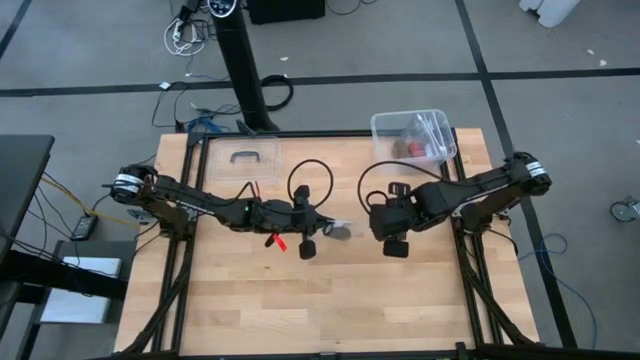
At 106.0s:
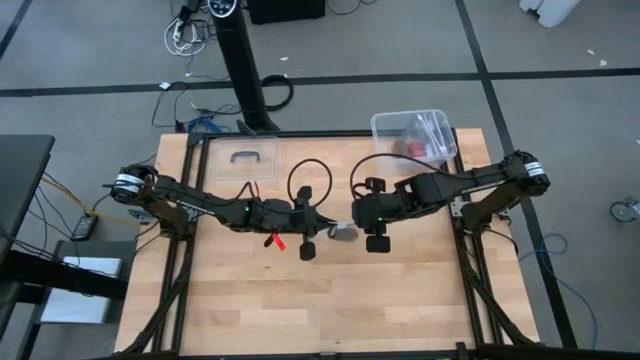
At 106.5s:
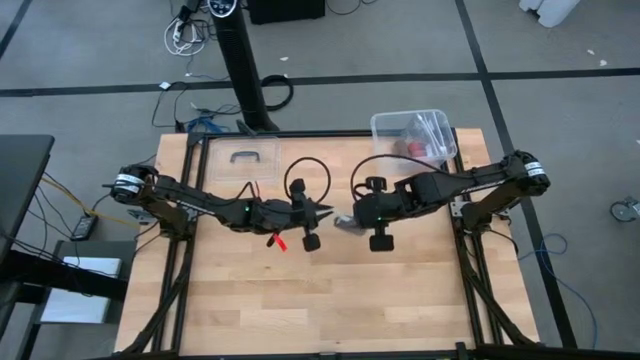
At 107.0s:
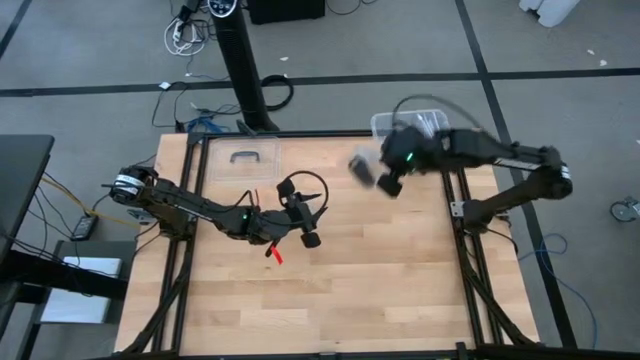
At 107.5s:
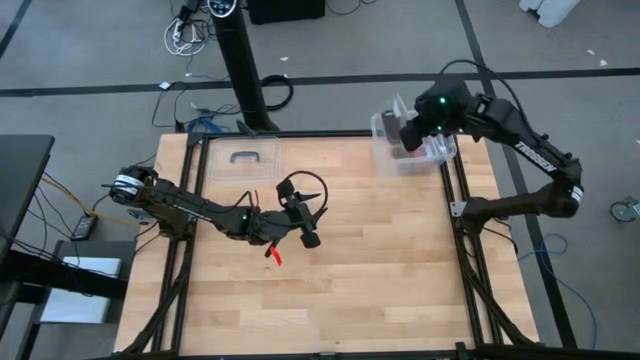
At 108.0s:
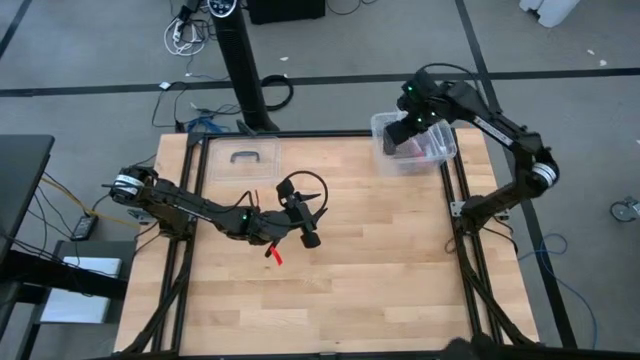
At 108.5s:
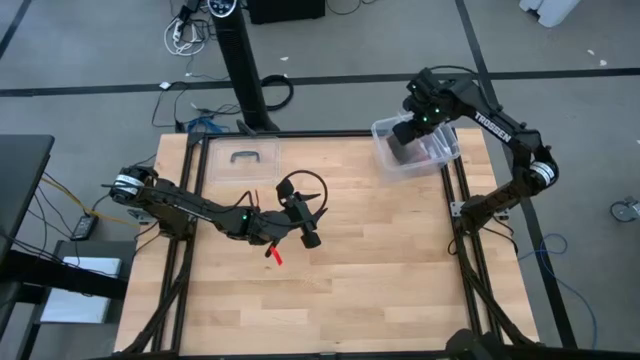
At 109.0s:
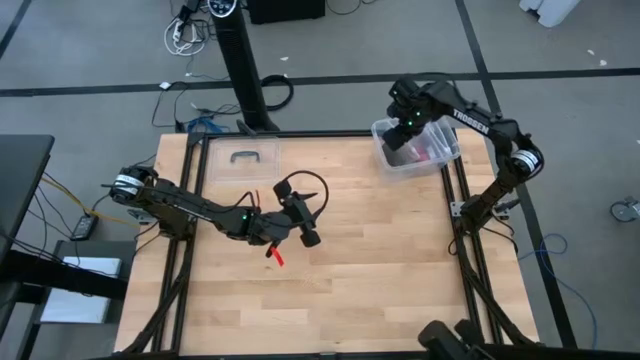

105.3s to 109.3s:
Task: Roll bandage
Put the transparent zip bag into the transparent bin

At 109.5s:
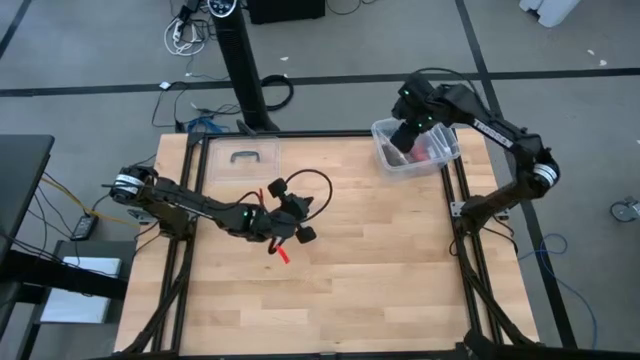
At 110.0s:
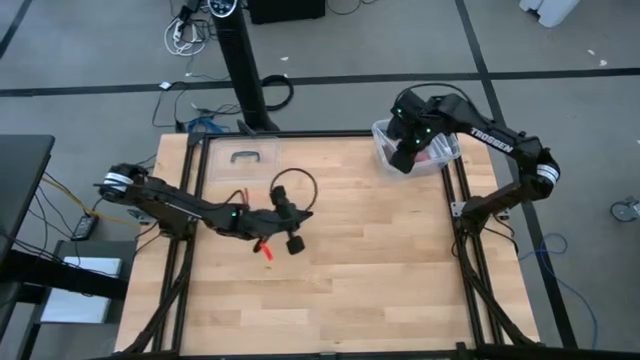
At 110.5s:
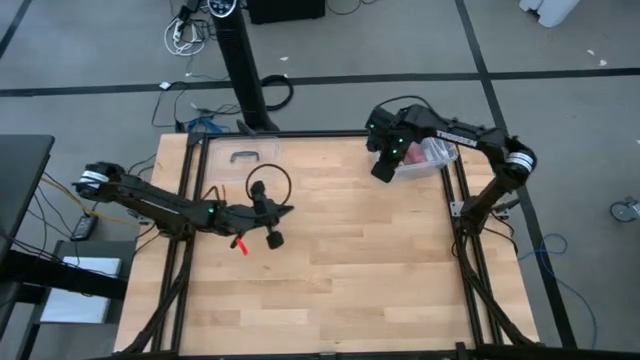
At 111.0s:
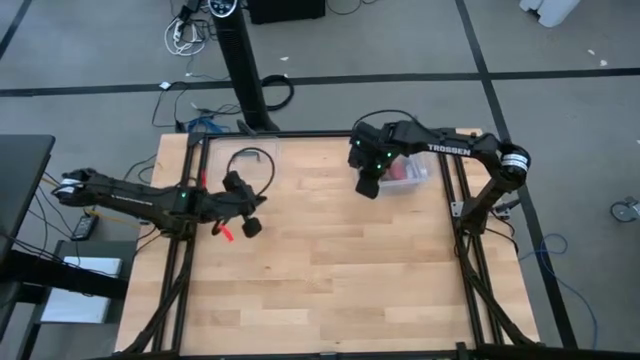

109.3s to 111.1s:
Adjust the transparent bin

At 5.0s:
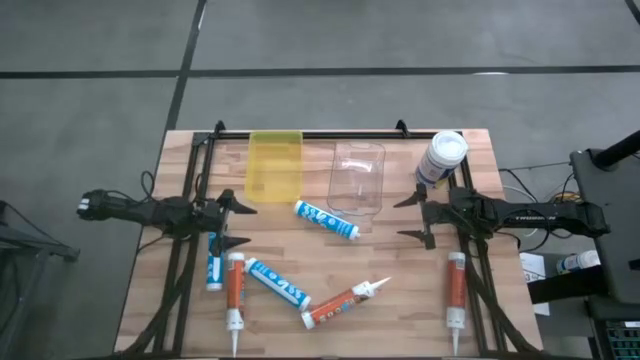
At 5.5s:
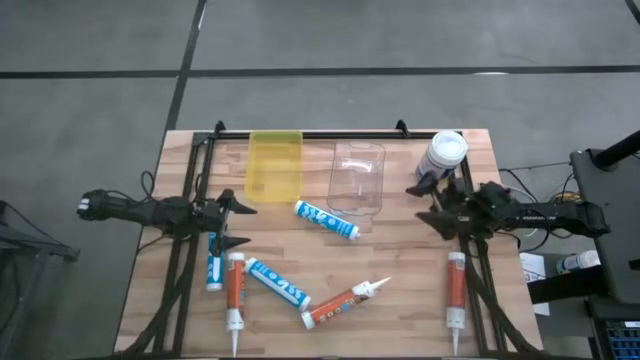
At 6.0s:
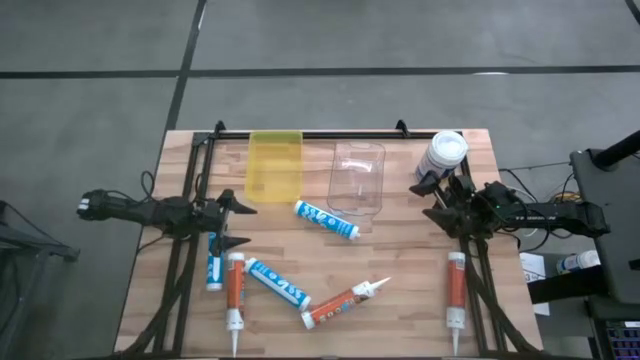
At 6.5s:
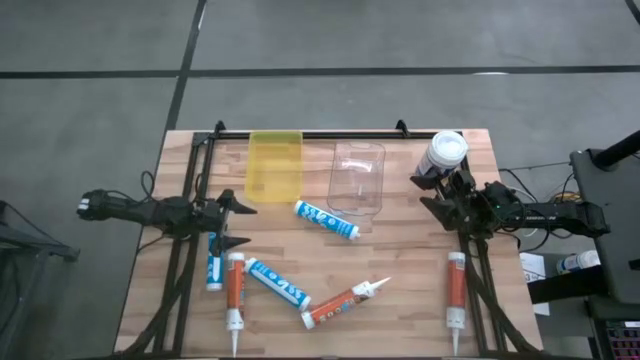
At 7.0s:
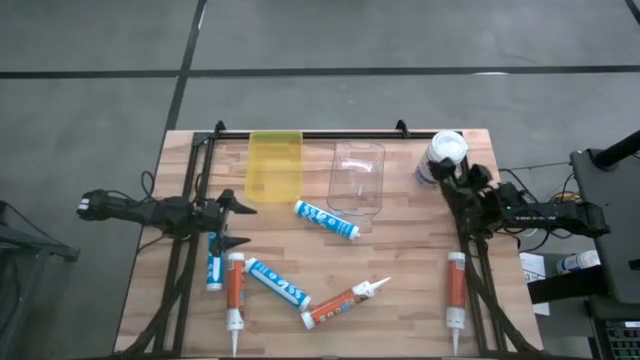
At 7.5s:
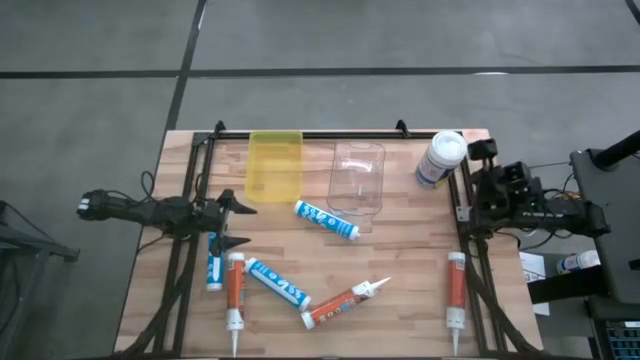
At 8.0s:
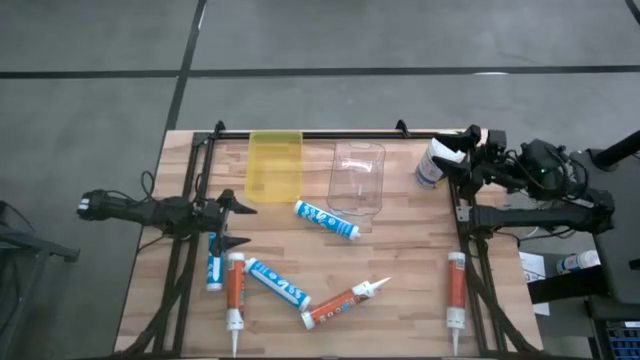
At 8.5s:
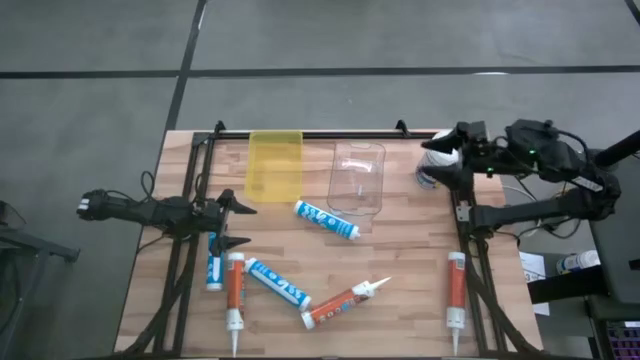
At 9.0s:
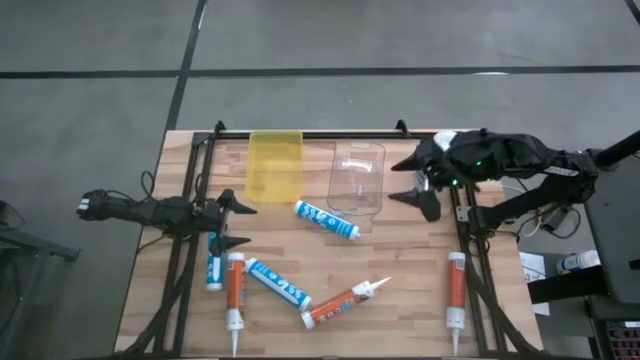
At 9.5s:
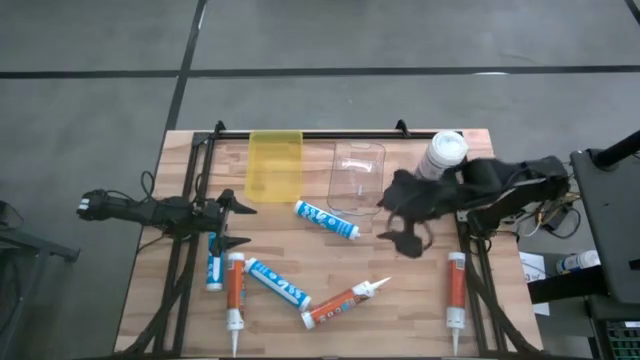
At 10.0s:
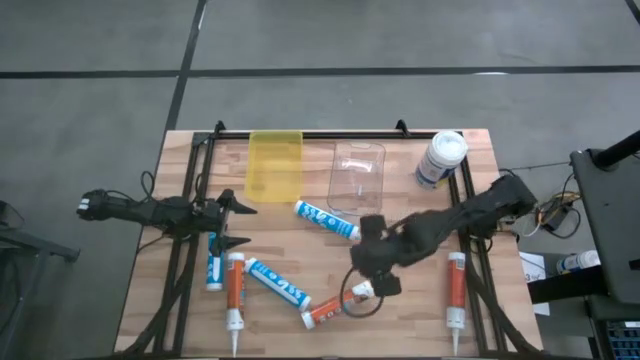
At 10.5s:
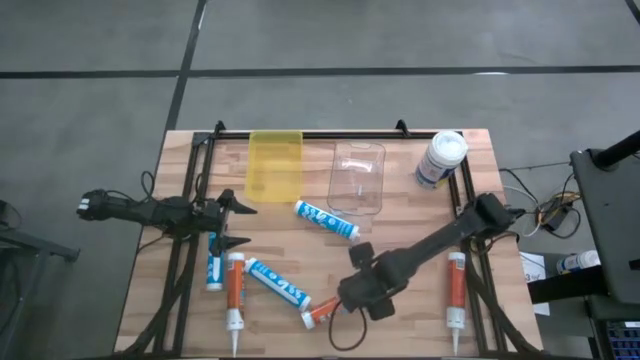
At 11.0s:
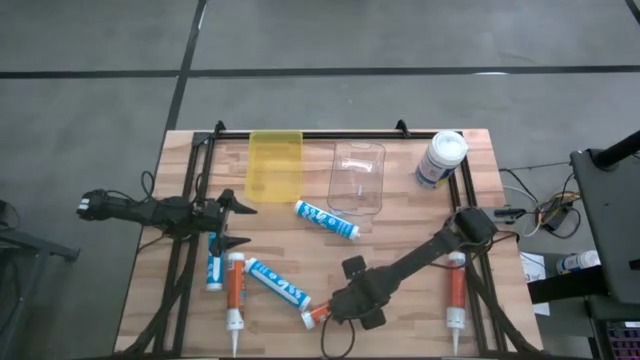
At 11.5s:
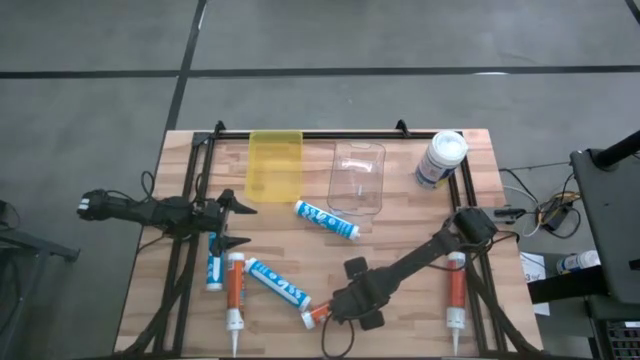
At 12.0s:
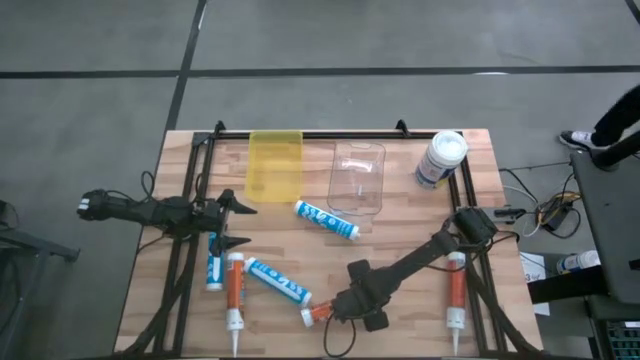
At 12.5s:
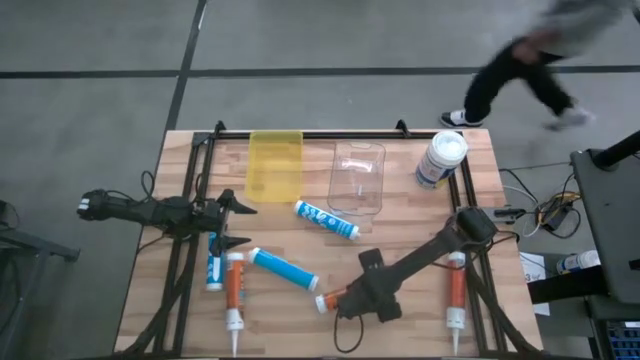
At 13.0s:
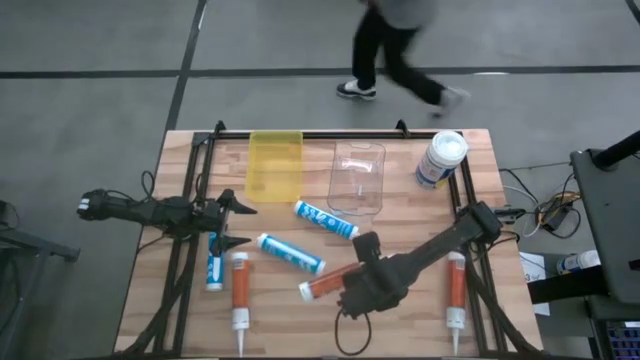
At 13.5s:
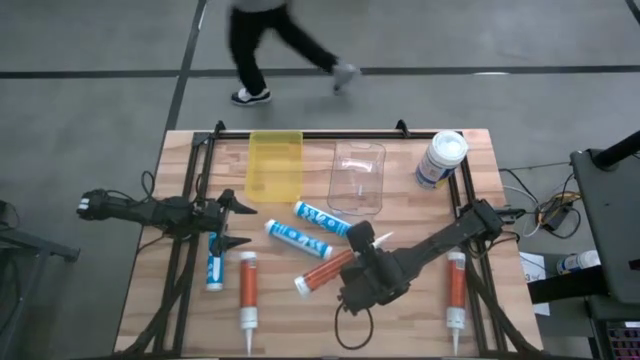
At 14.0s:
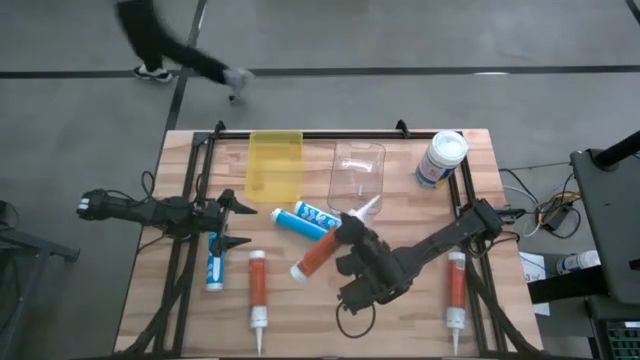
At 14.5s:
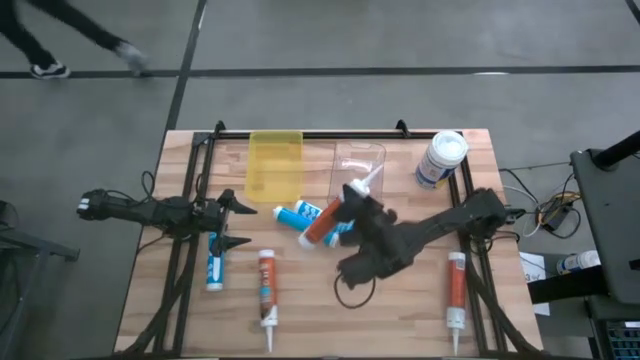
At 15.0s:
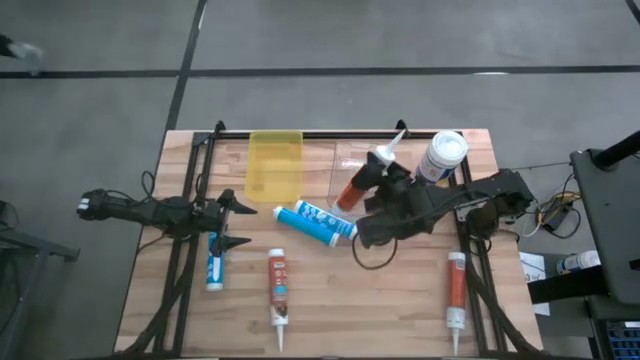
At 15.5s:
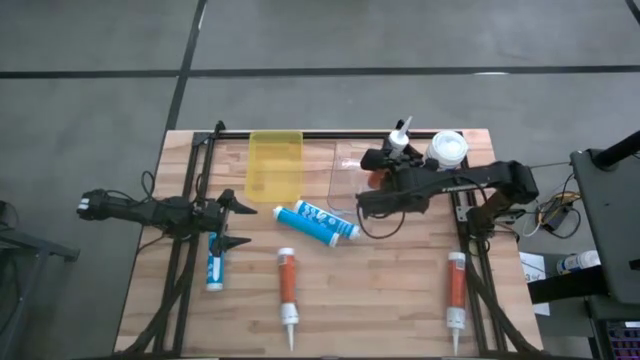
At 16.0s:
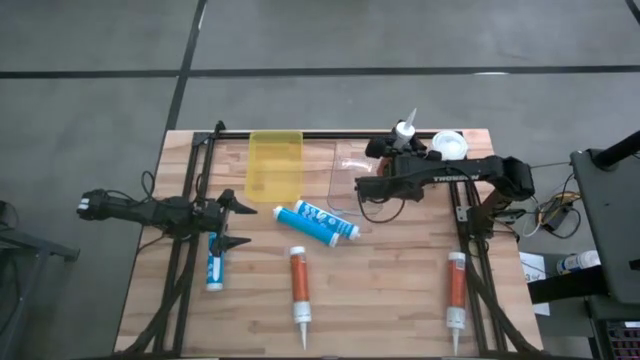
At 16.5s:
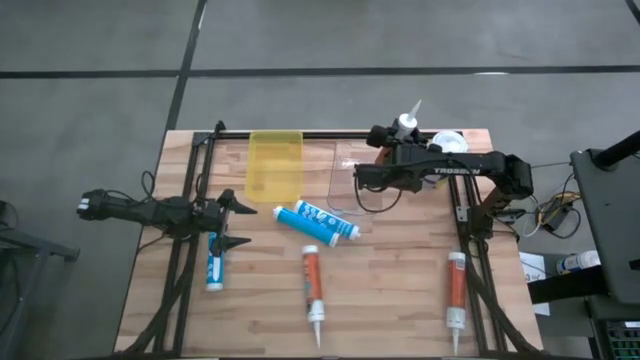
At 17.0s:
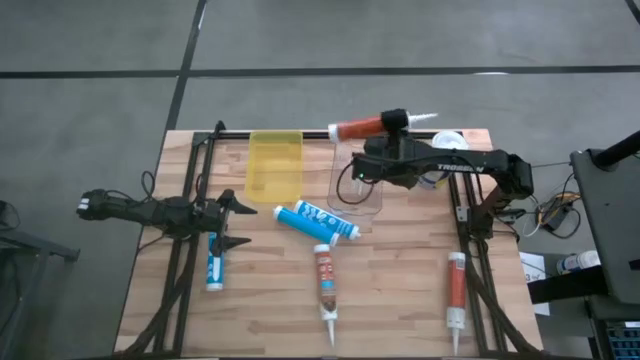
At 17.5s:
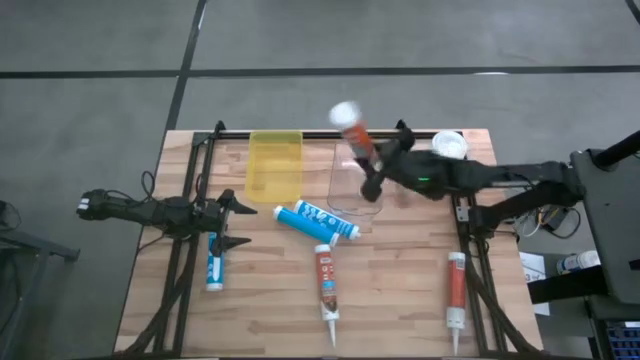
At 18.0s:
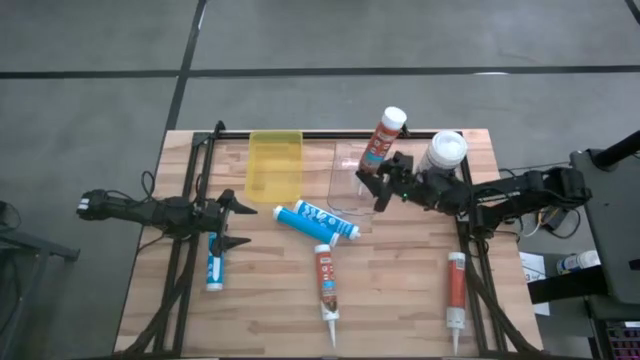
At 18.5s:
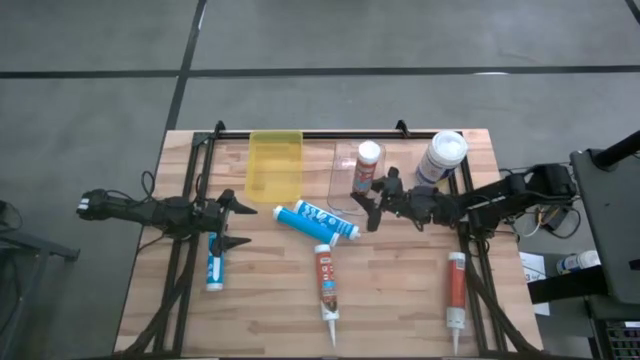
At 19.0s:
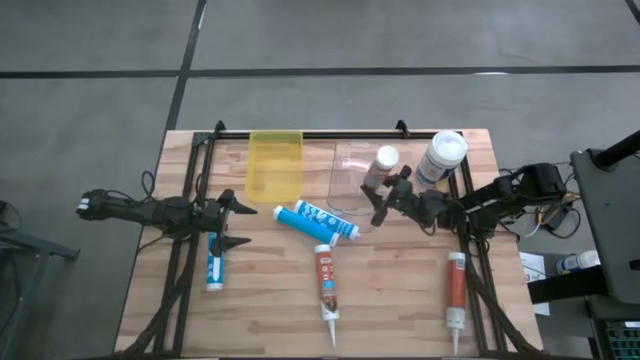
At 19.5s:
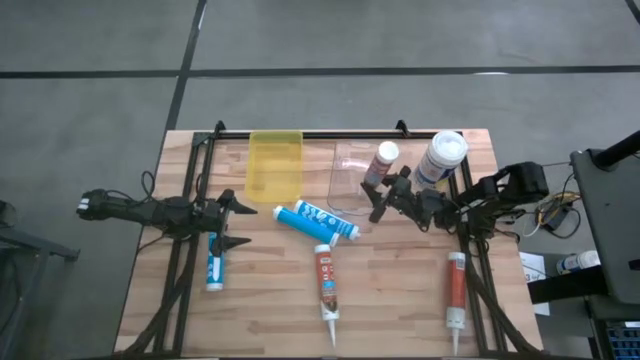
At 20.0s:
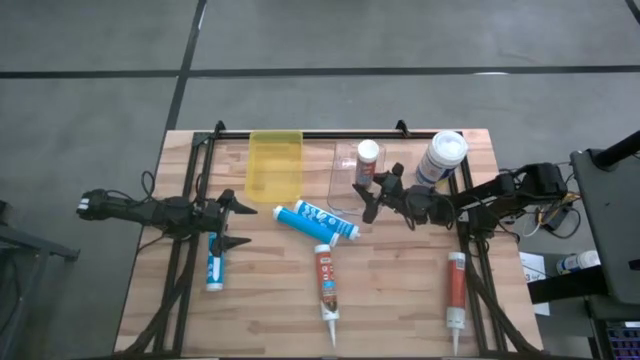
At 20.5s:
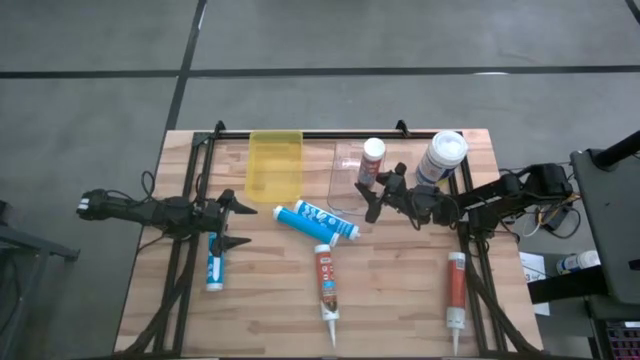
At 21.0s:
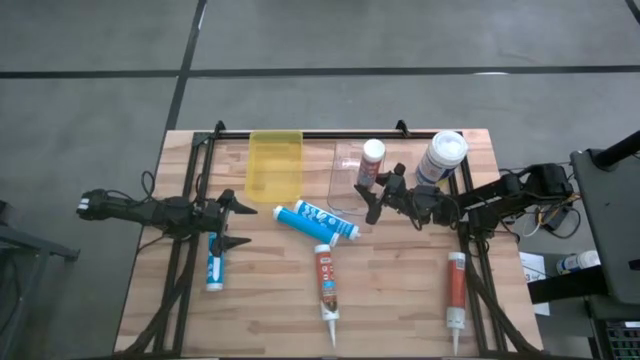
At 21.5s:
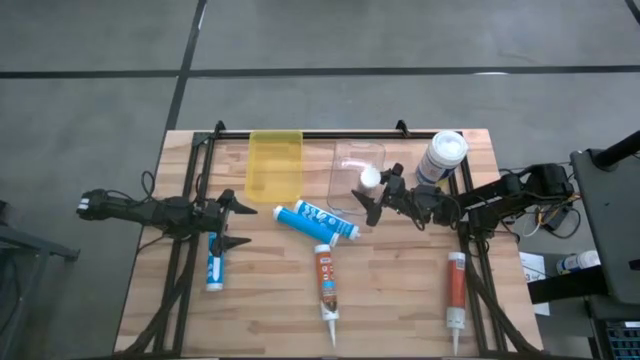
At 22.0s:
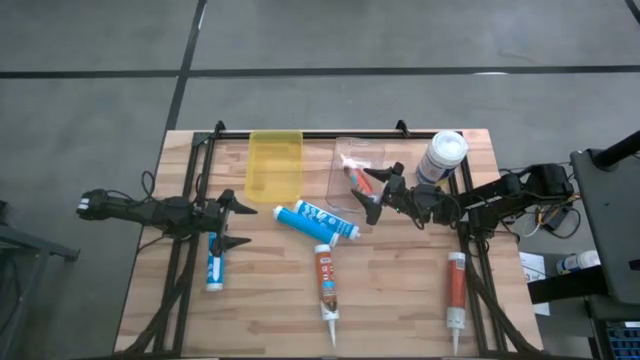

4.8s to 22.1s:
Task: Pick & place silicon tubes, Sealant and Lysol wipes
Put the middle orange sealant into the transparent bin
